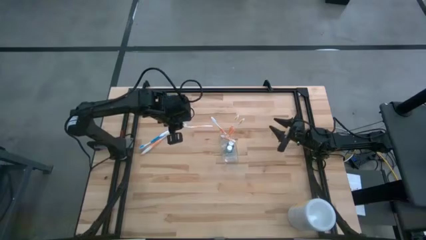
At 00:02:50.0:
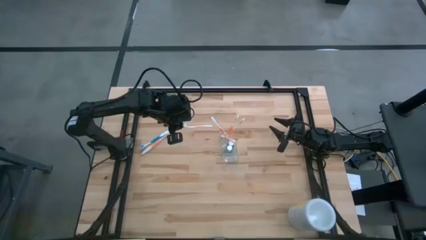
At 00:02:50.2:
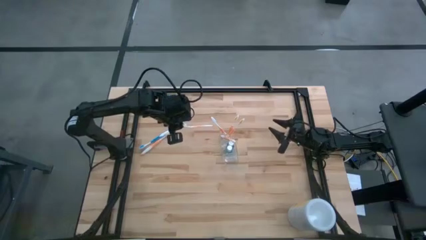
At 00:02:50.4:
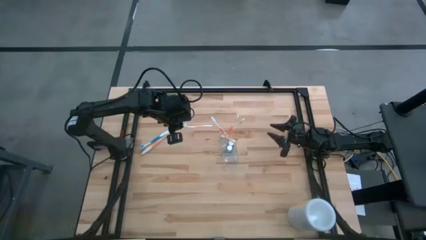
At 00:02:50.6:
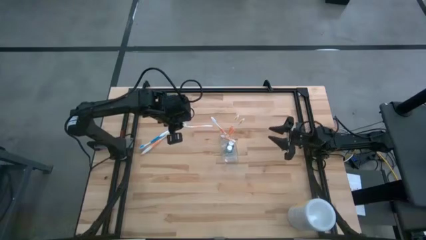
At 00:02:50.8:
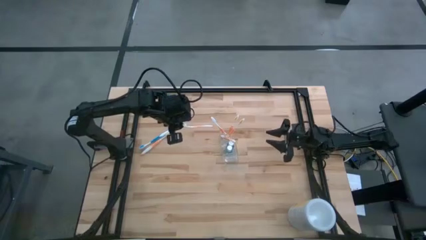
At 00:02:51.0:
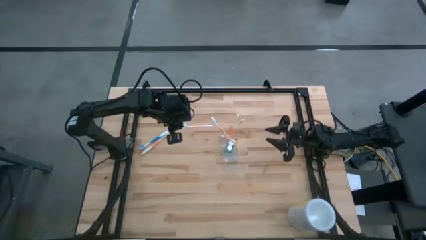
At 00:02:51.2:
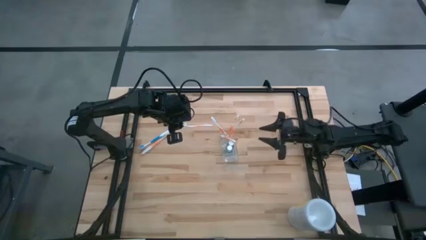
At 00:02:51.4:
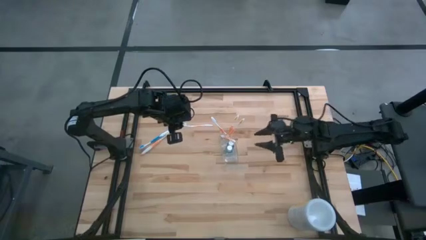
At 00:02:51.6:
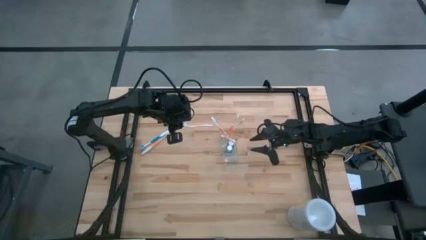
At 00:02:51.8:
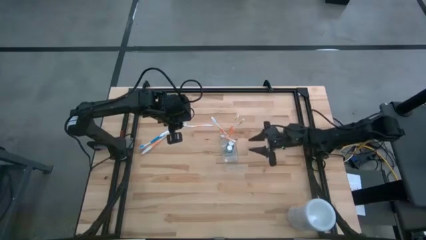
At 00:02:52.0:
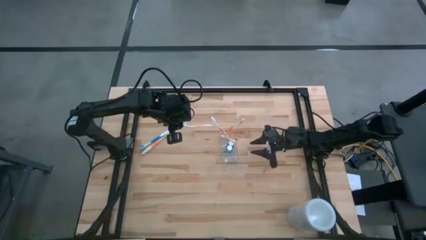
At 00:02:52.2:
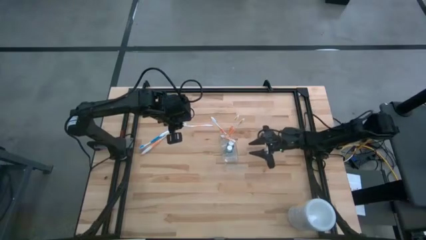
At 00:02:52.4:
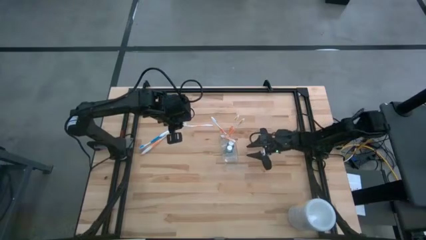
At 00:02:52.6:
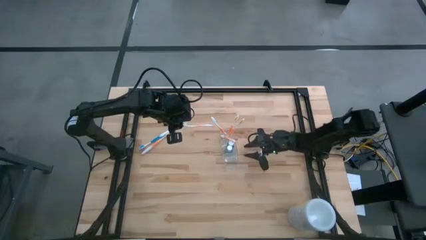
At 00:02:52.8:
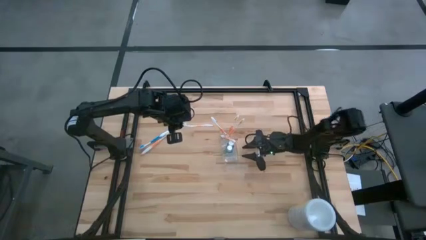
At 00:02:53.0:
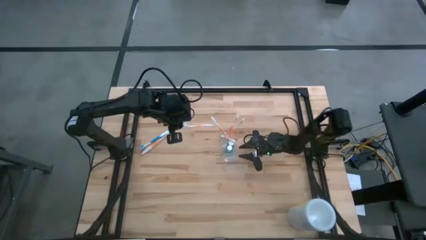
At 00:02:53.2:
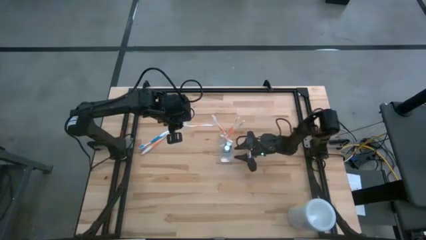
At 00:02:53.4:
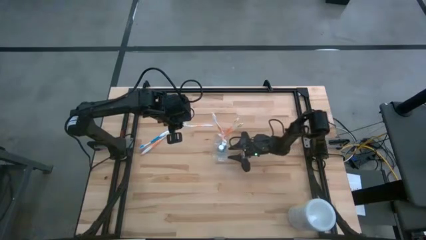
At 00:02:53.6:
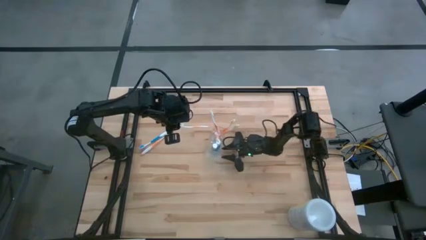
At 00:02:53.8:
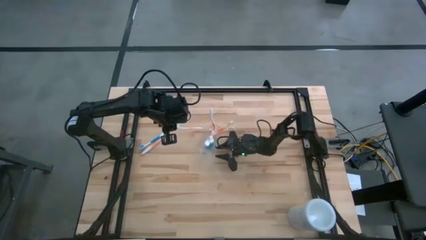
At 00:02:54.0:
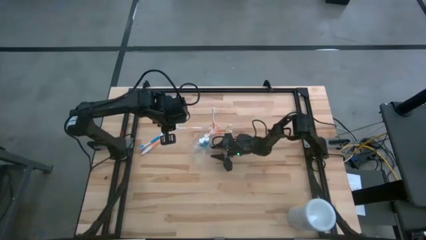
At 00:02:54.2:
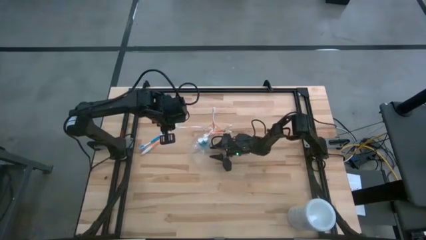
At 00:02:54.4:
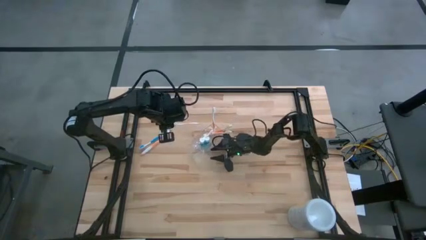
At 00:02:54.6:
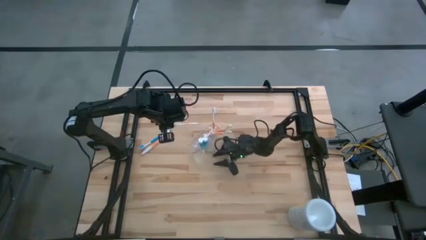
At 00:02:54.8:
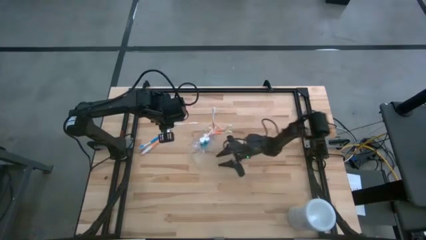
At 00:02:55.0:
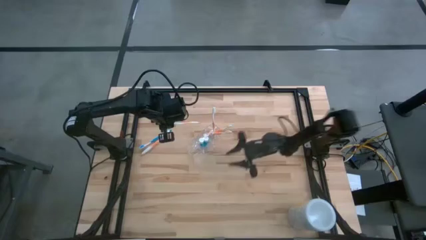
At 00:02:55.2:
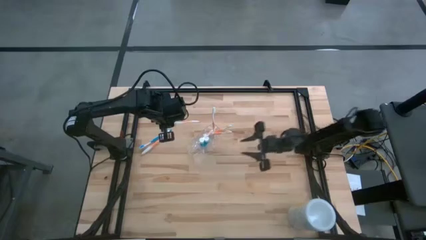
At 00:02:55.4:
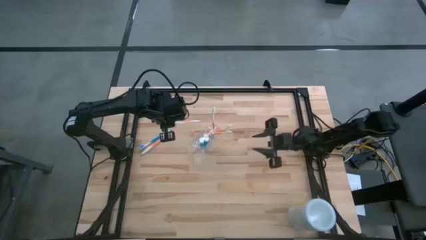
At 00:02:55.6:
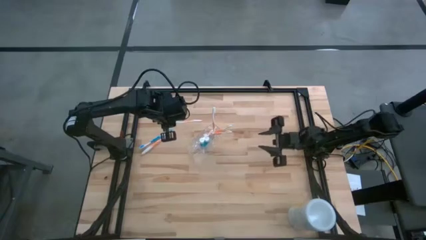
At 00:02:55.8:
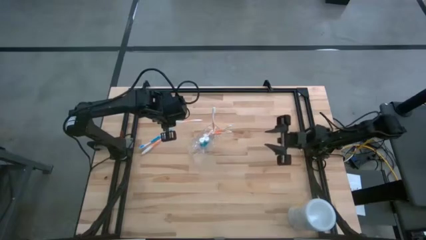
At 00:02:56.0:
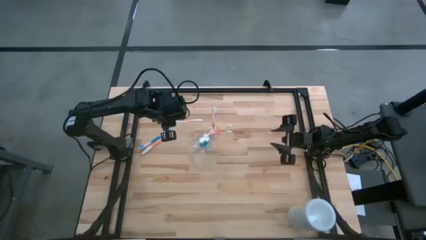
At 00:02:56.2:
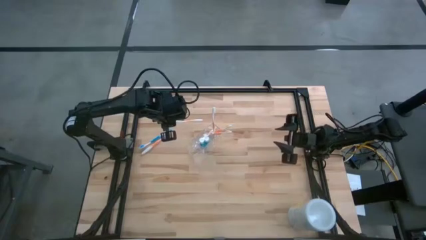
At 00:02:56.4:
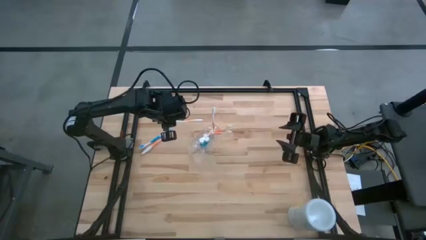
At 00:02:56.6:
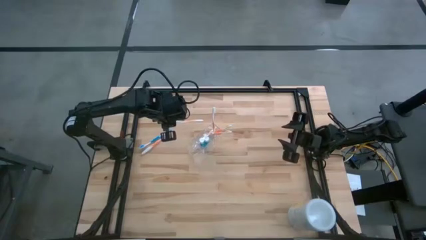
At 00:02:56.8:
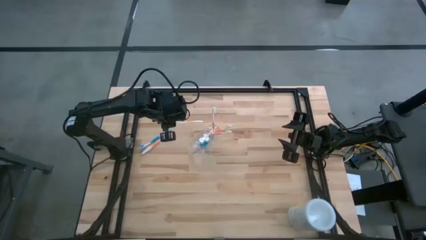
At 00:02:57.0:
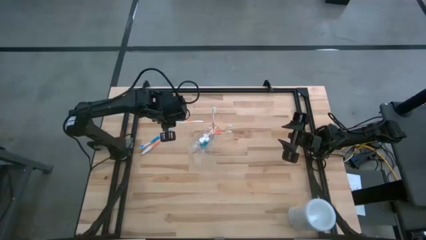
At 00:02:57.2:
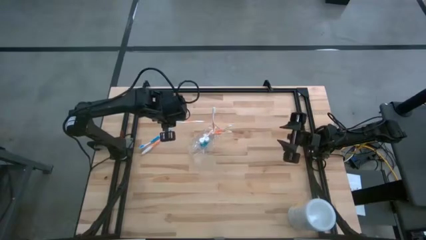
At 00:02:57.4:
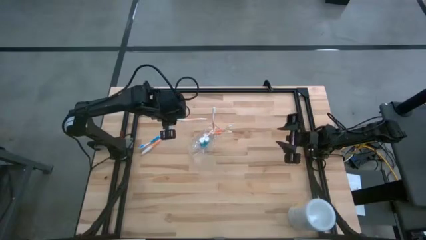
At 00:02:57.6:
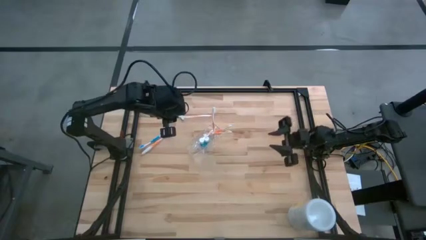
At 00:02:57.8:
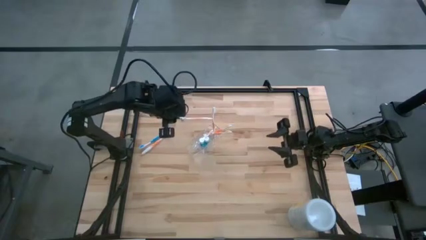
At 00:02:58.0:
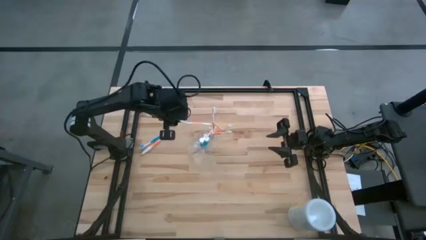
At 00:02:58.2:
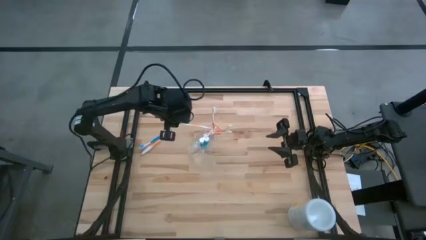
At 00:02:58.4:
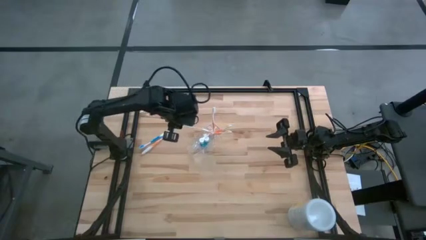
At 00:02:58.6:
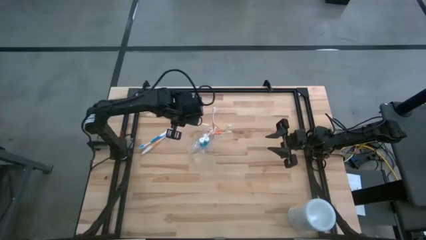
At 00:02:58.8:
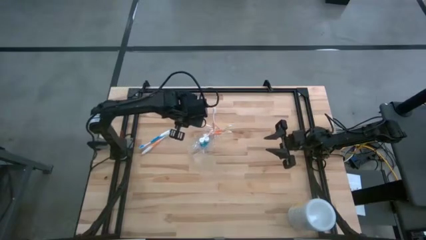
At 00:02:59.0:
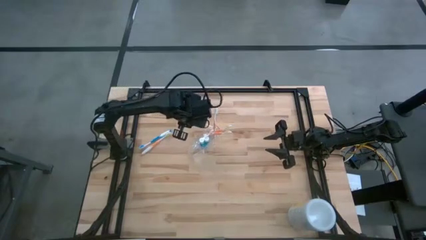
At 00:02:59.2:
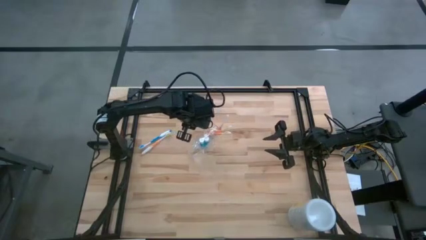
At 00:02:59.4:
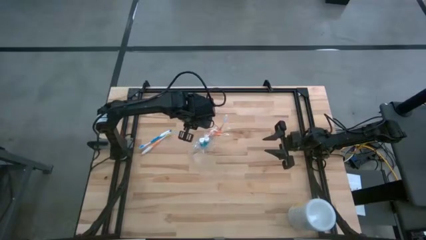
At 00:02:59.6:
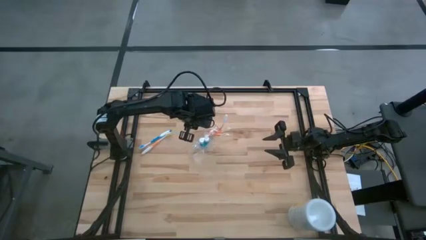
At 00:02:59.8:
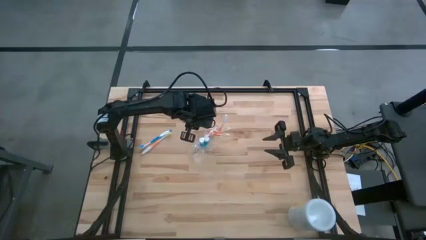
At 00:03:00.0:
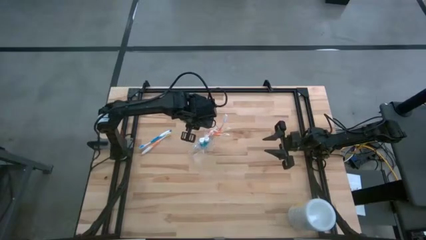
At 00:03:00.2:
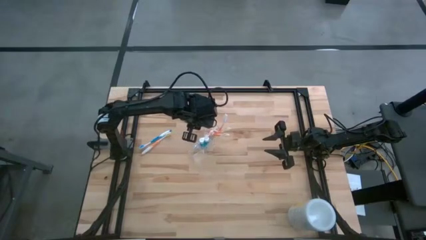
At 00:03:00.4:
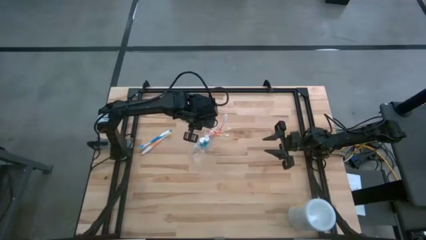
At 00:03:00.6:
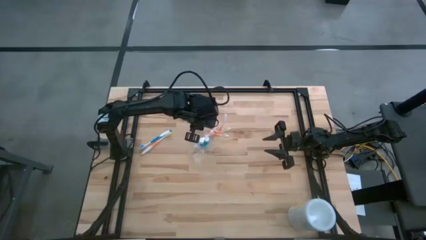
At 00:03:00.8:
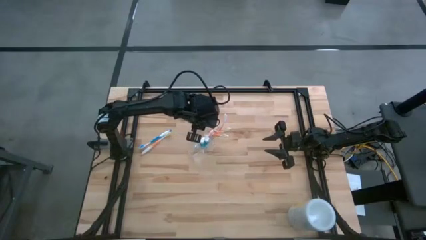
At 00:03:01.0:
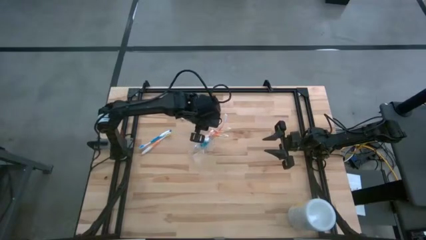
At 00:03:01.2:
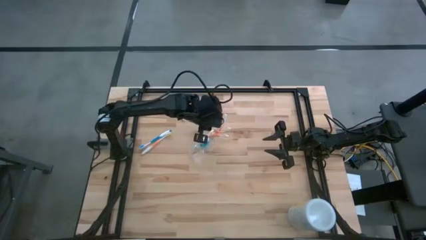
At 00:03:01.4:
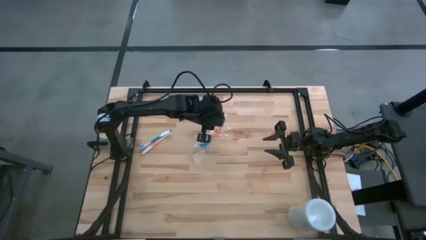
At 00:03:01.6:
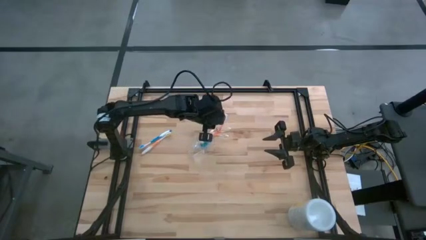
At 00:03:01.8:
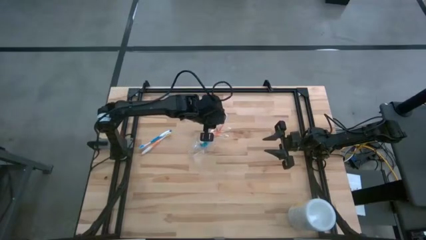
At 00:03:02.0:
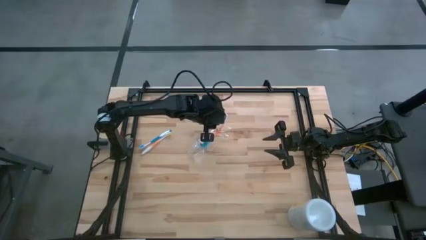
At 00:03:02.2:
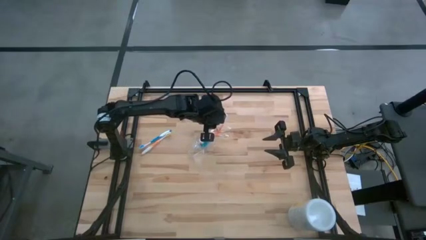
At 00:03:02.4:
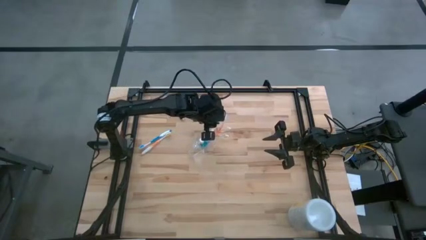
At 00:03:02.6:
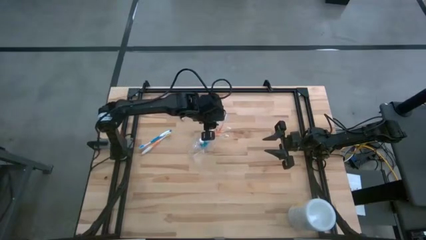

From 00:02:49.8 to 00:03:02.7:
Task: Pick & Place toothbrushing station
Put the orange toothbrush into the transparent

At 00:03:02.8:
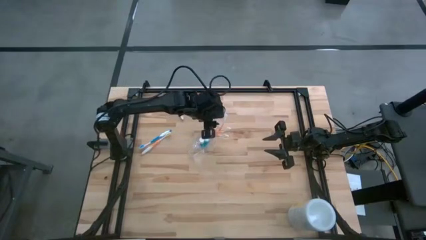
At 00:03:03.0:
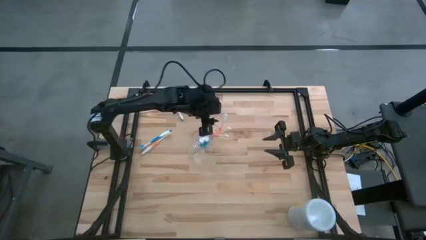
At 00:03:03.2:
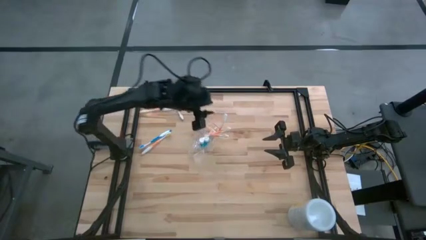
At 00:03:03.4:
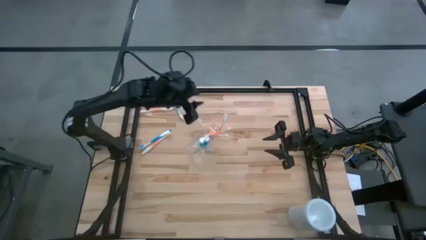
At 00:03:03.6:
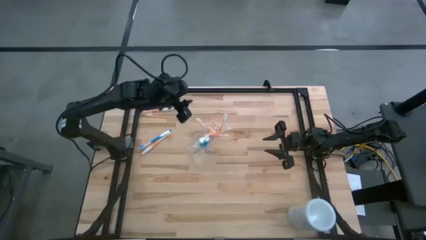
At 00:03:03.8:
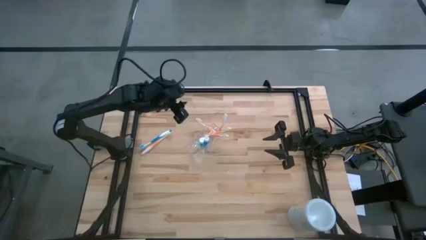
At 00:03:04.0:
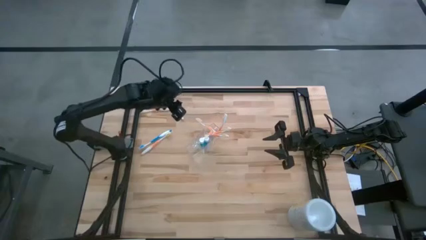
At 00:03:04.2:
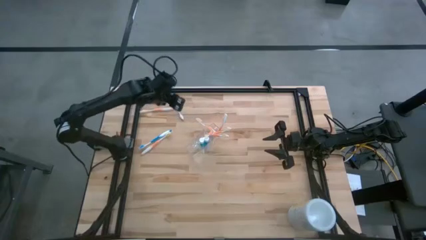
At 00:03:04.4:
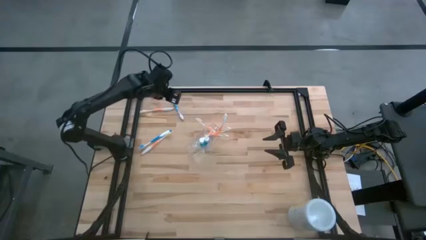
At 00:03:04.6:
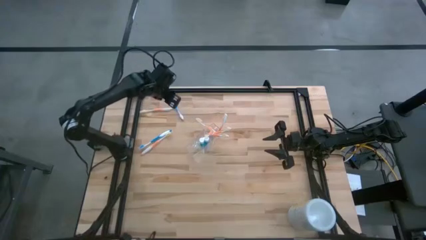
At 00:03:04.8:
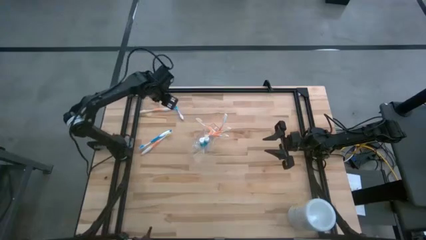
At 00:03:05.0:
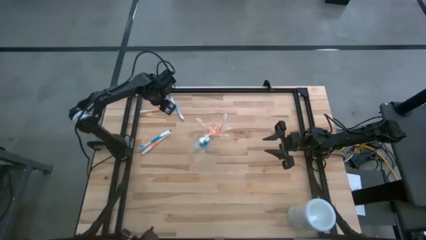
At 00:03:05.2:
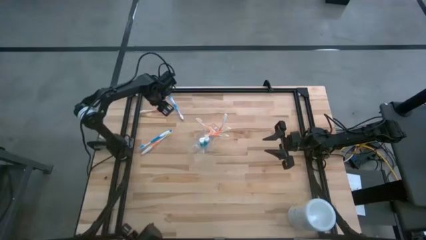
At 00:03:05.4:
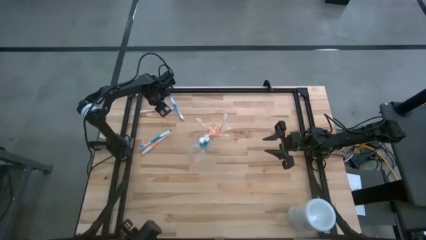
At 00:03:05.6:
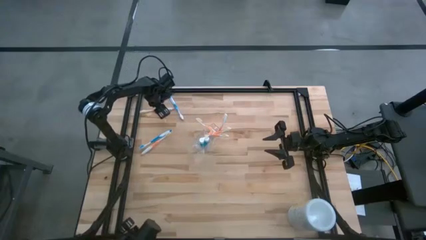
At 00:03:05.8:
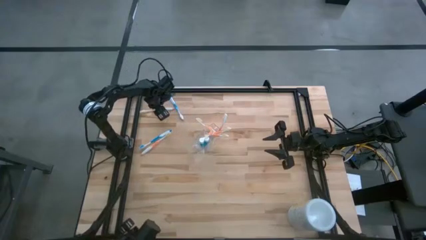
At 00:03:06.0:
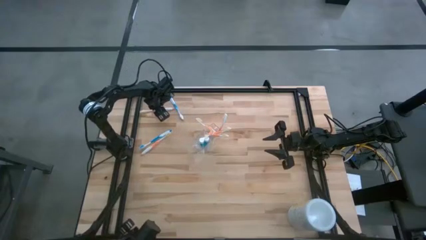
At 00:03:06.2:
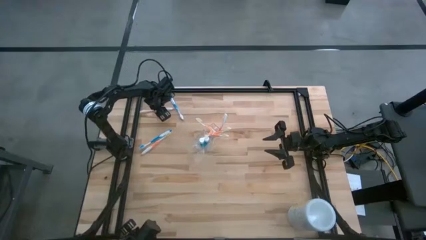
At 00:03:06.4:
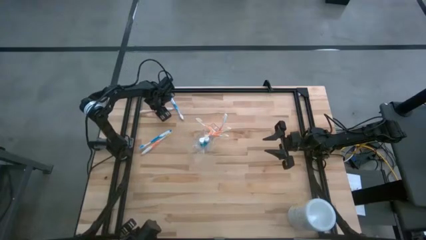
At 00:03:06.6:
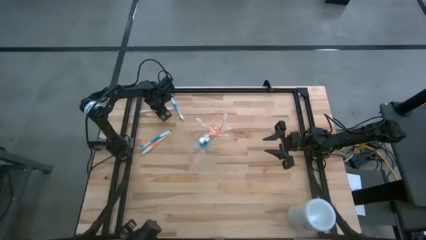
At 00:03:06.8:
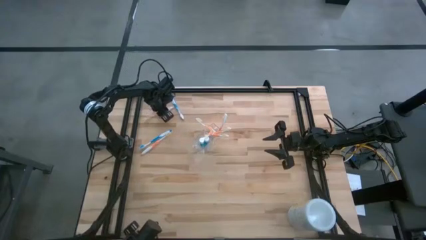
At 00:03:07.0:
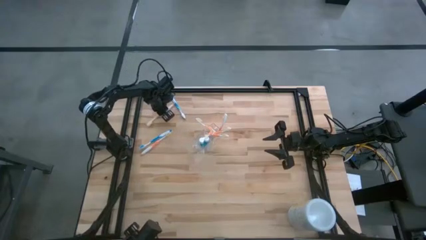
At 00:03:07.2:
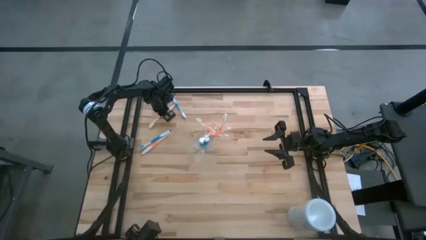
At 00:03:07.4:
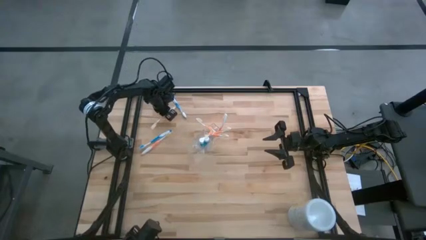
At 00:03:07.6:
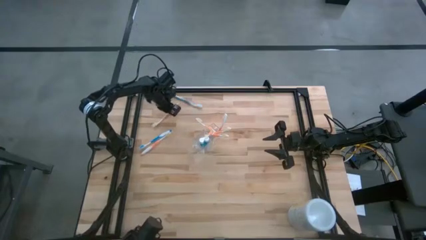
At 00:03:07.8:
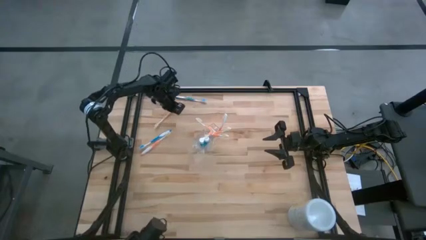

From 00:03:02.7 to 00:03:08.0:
Put the orange toothbrush into the transparent organizer
